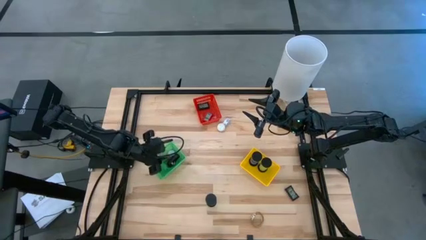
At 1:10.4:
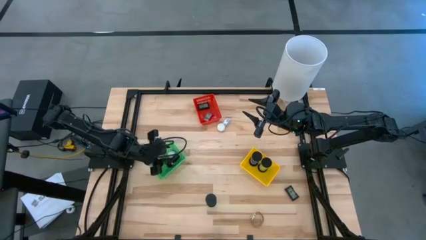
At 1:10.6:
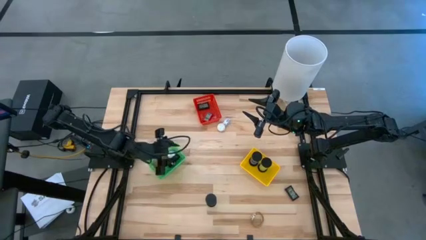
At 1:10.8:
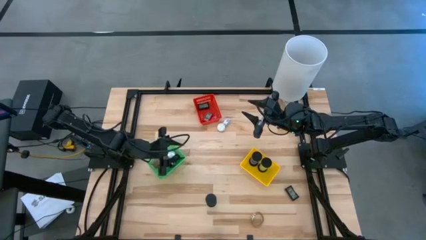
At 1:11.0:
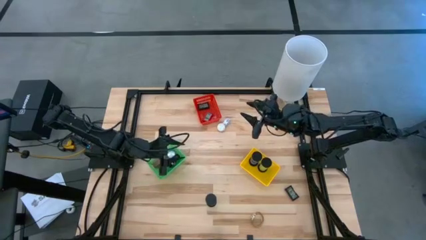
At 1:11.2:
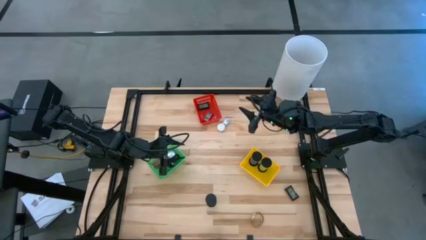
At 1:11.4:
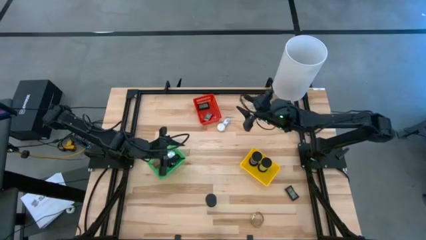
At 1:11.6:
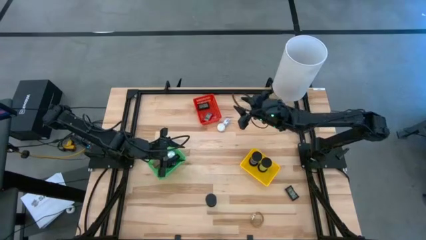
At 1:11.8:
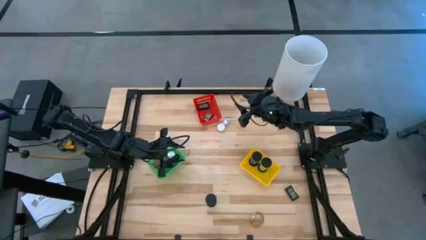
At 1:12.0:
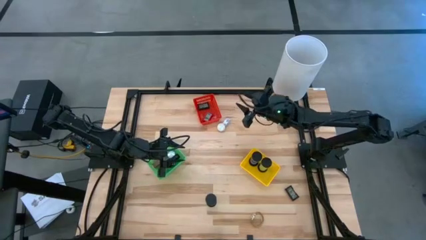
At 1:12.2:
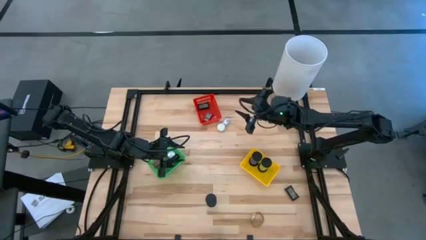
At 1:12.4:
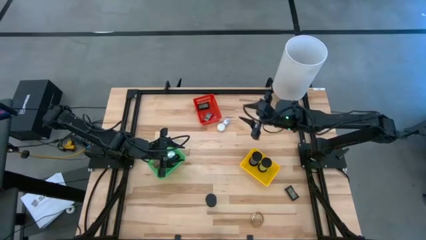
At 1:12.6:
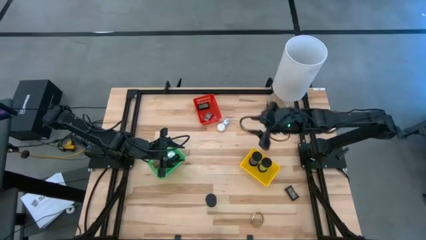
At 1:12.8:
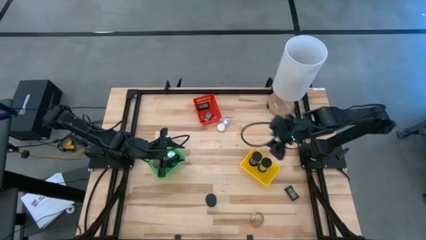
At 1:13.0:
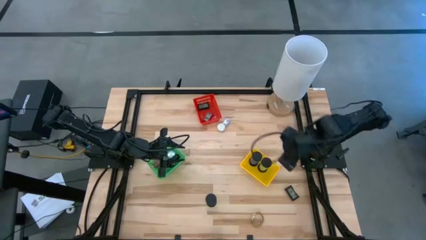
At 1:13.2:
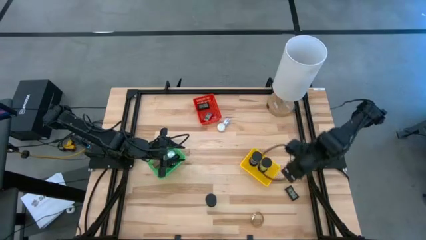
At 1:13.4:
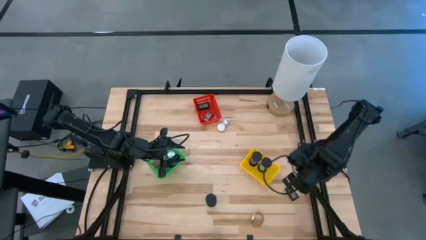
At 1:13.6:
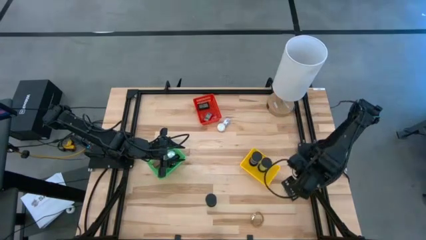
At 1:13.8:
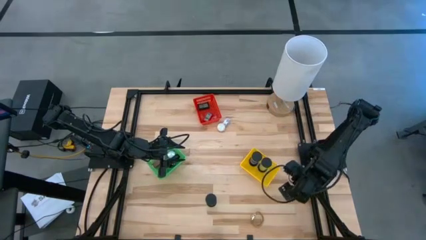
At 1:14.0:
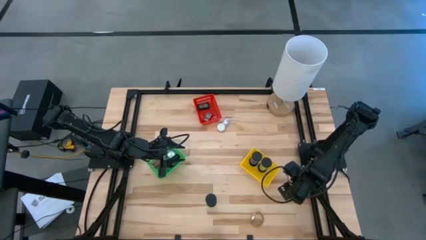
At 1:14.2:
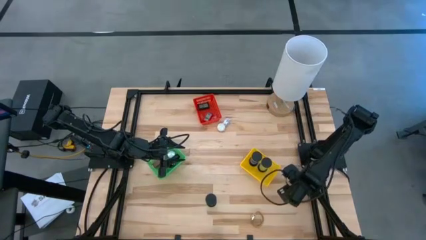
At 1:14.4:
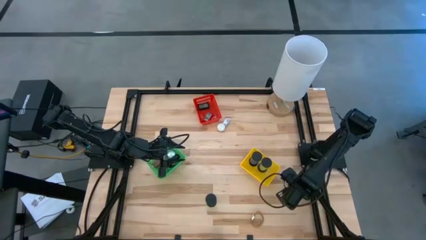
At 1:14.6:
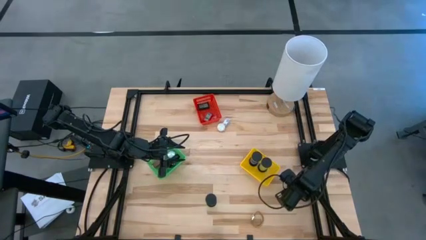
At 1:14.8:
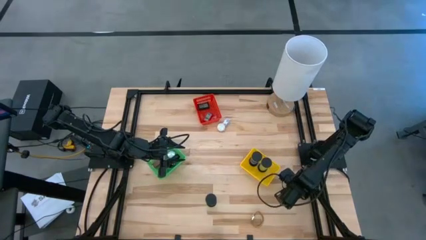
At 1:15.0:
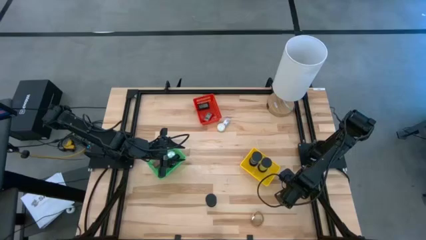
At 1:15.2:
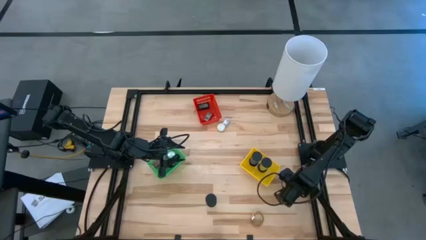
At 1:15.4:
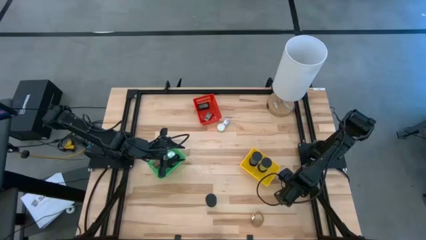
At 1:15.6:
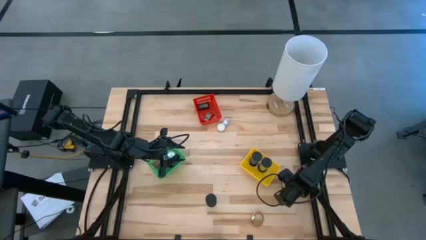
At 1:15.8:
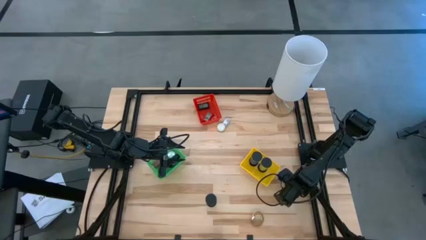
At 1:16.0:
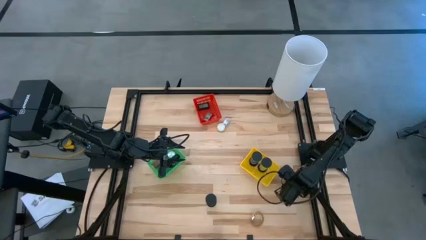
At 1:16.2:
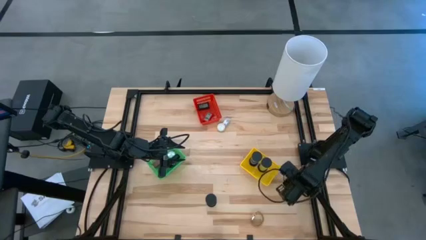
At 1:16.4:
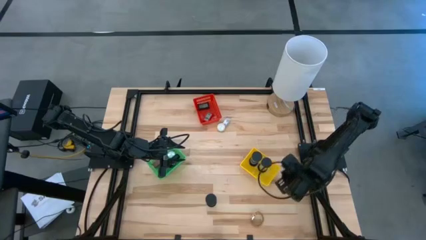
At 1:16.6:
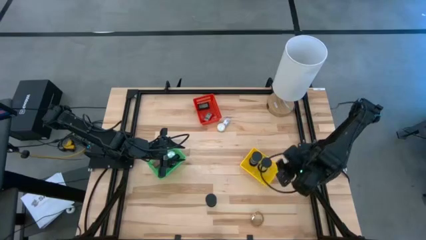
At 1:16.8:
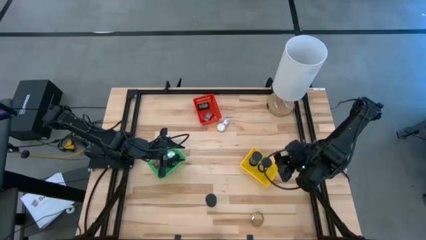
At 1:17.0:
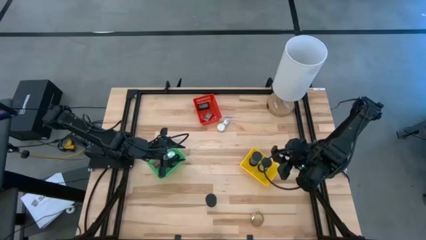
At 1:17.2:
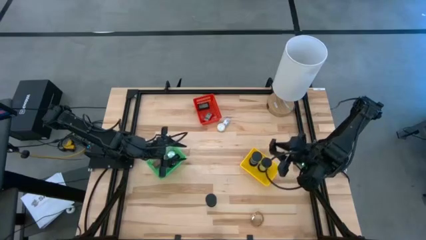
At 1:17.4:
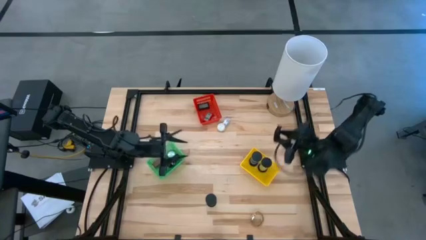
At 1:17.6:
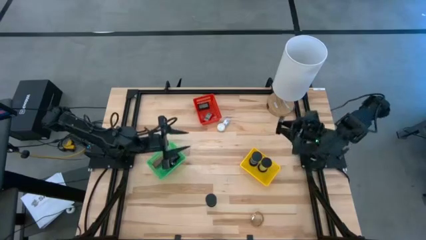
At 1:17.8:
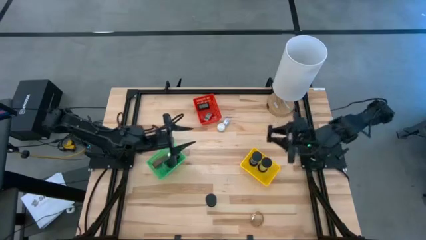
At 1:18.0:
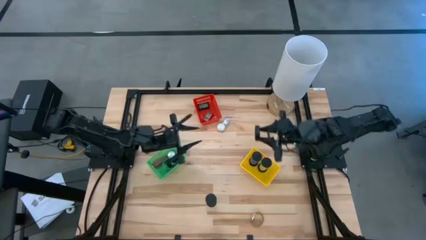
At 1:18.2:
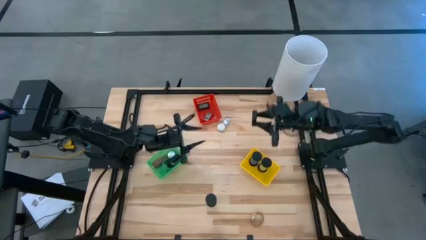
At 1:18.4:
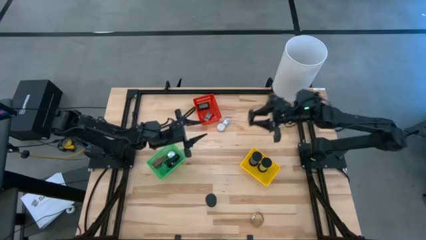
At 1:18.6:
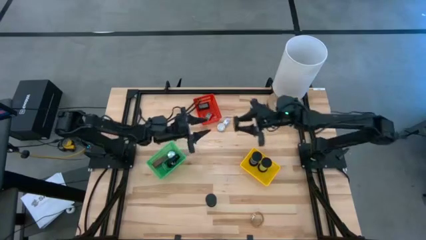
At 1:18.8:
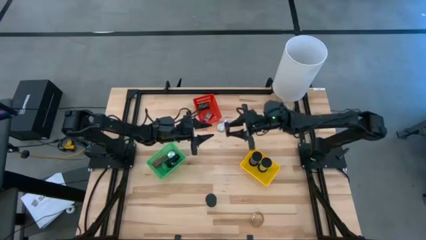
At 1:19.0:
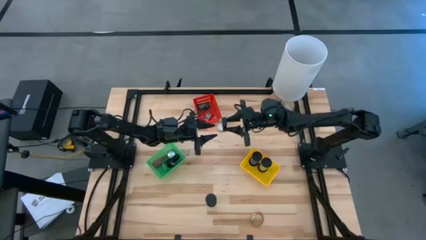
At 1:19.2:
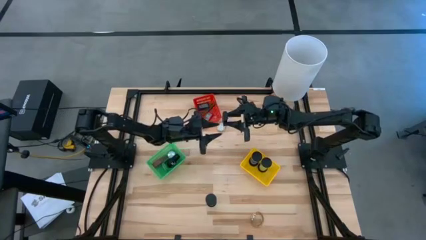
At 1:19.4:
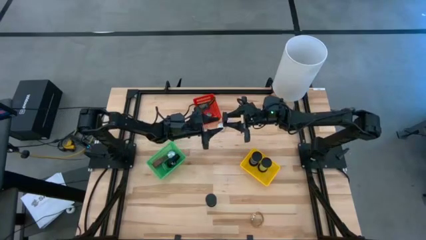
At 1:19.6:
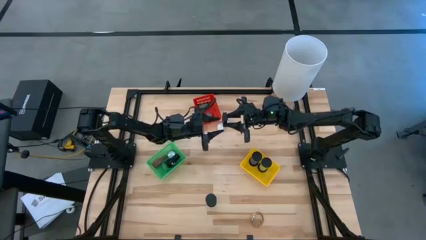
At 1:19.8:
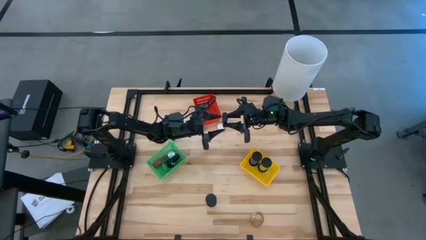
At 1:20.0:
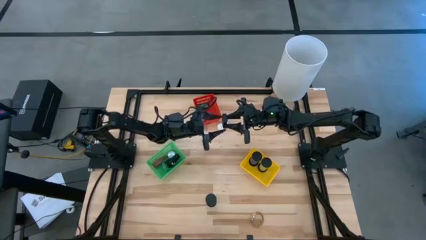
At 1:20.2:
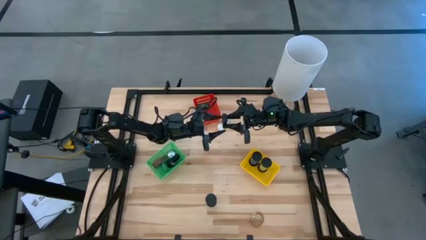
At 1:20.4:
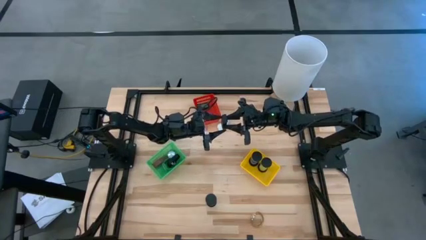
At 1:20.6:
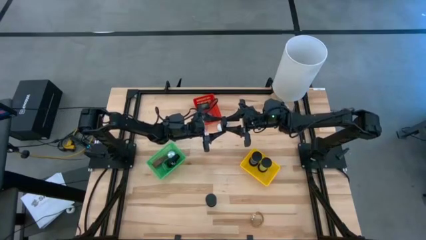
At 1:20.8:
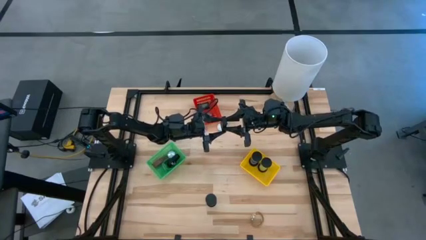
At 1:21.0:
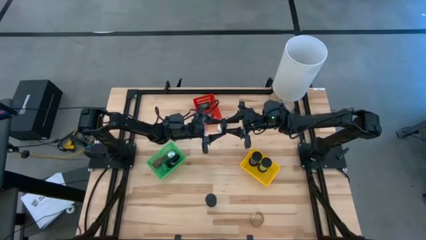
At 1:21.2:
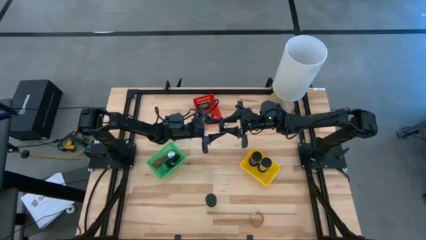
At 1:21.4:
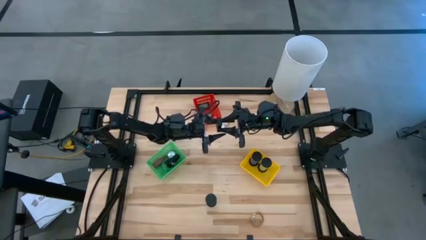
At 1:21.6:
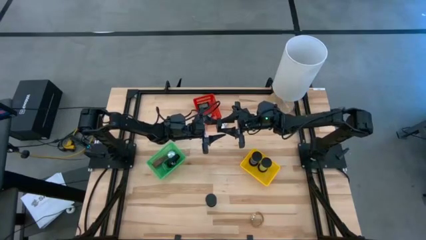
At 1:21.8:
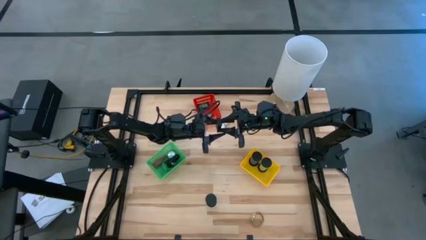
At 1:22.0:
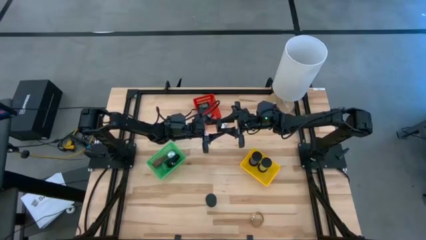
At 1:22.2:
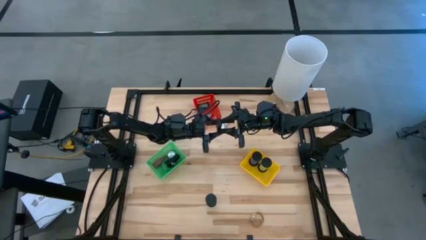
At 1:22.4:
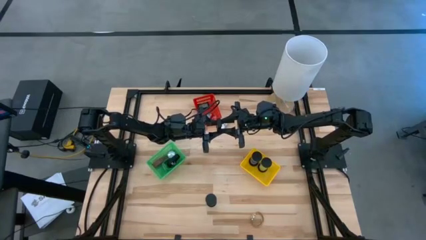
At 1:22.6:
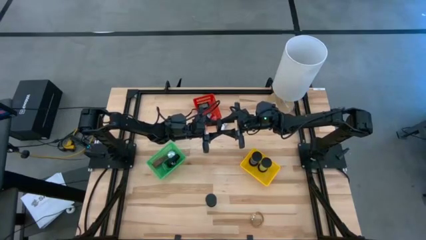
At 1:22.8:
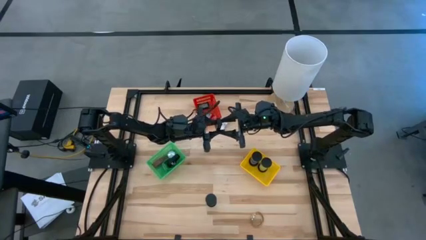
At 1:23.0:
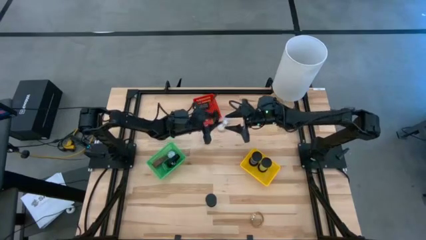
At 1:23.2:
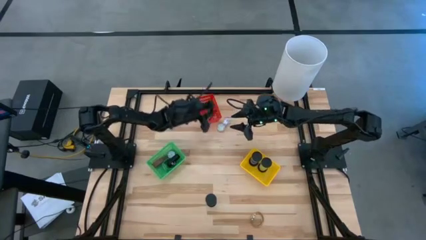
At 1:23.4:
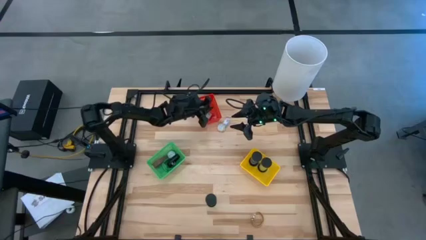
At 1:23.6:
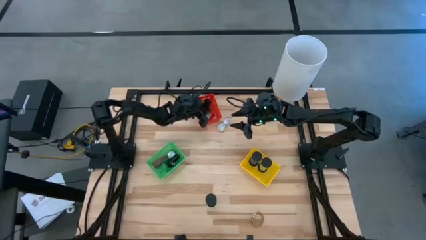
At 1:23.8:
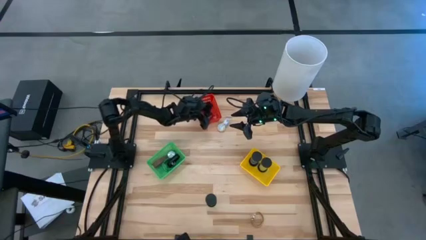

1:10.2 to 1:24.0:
Task: Pick & Place Office items
Put the black digital clock into the red bin
